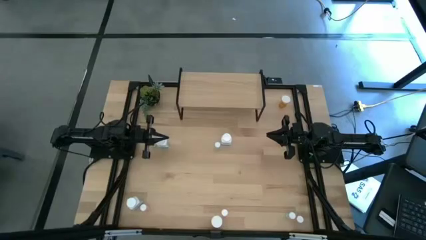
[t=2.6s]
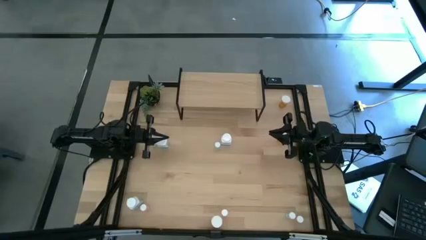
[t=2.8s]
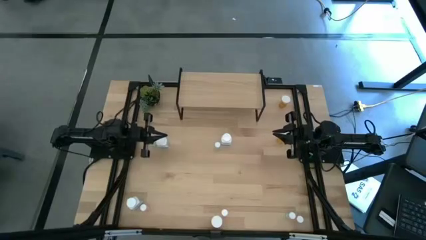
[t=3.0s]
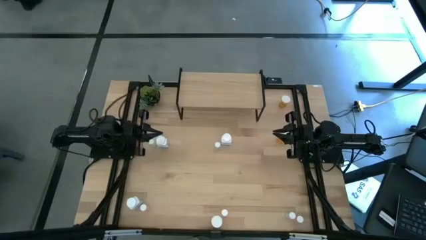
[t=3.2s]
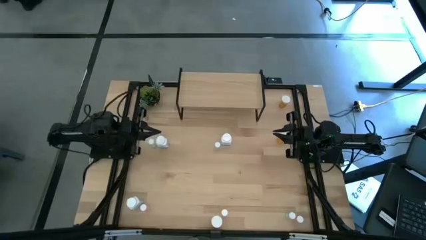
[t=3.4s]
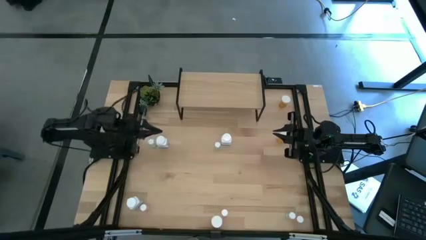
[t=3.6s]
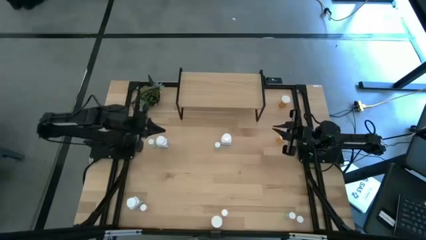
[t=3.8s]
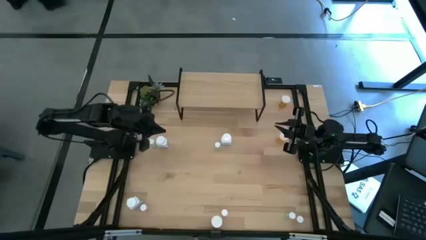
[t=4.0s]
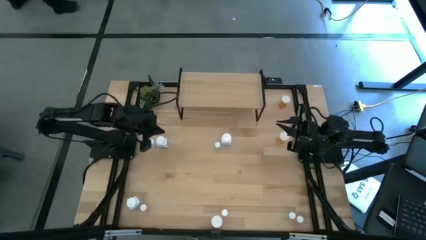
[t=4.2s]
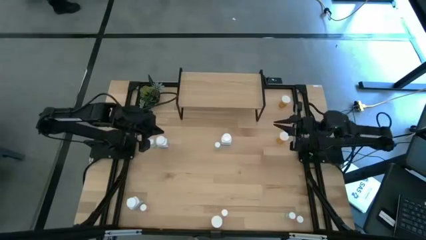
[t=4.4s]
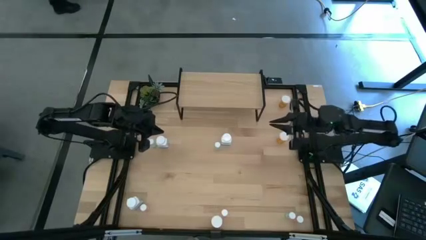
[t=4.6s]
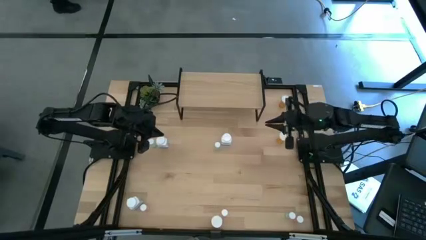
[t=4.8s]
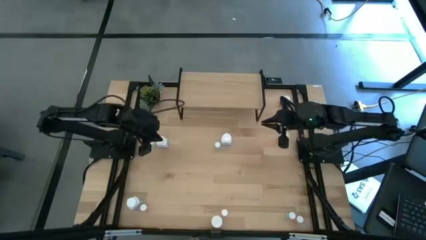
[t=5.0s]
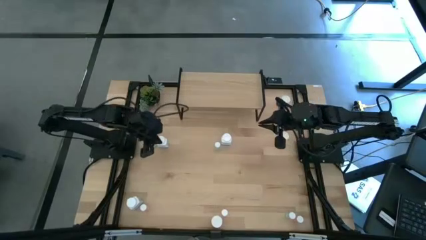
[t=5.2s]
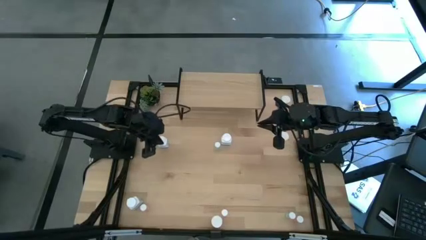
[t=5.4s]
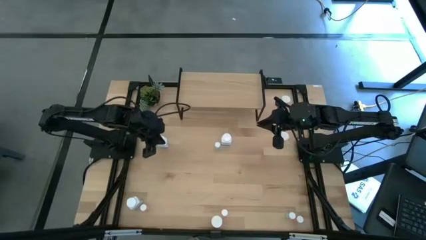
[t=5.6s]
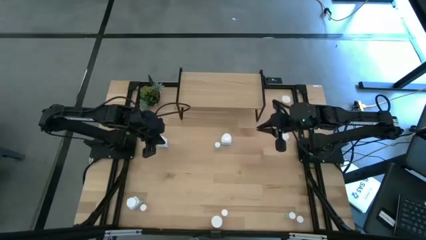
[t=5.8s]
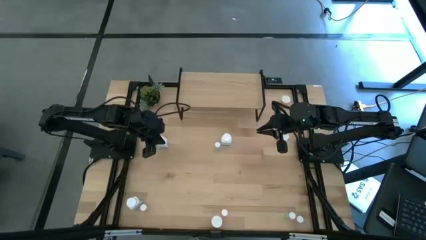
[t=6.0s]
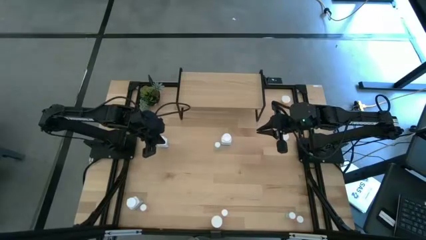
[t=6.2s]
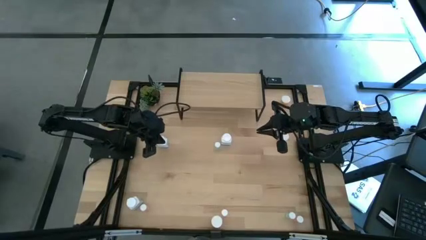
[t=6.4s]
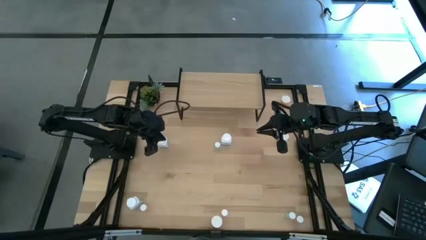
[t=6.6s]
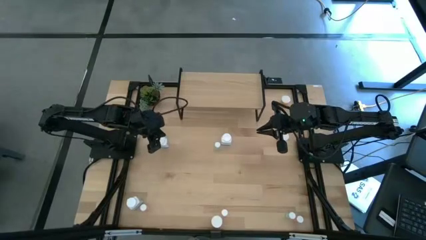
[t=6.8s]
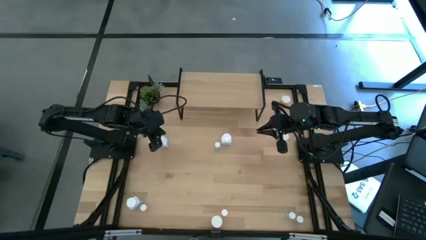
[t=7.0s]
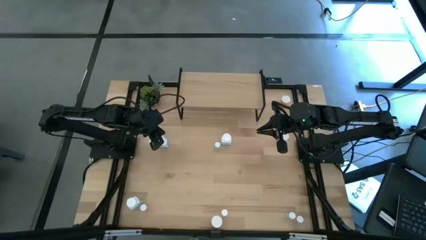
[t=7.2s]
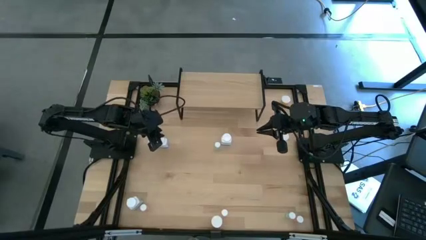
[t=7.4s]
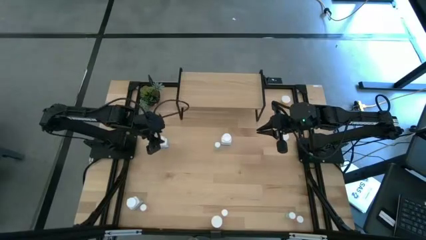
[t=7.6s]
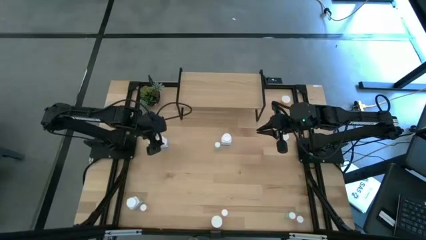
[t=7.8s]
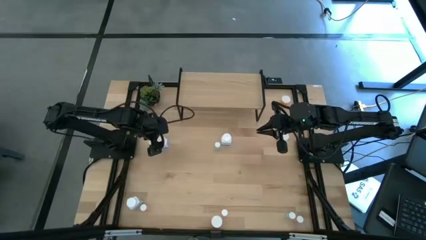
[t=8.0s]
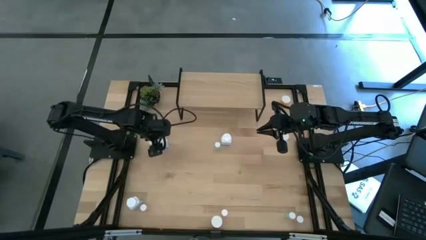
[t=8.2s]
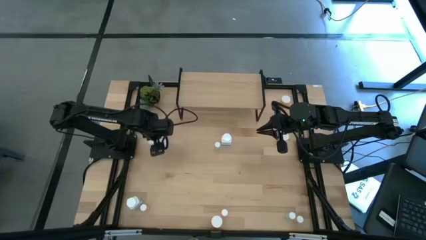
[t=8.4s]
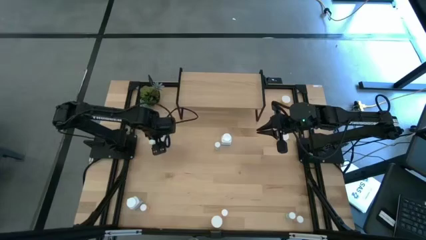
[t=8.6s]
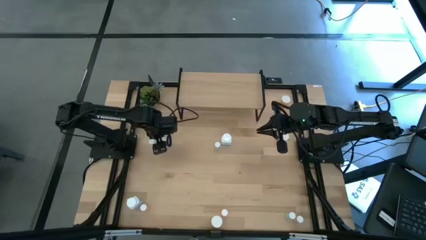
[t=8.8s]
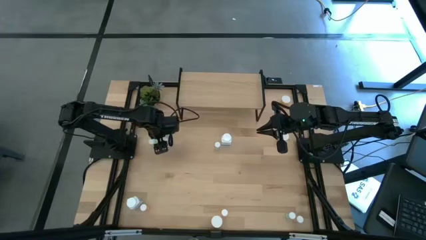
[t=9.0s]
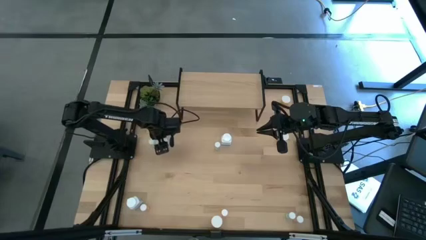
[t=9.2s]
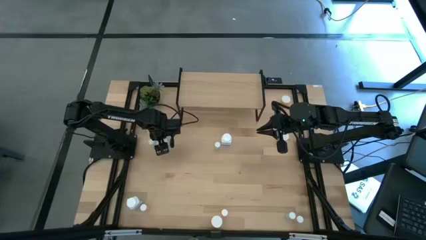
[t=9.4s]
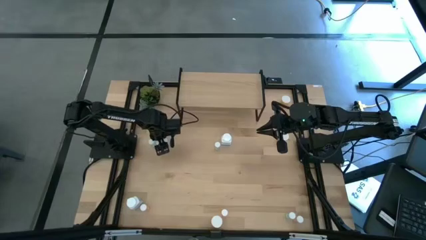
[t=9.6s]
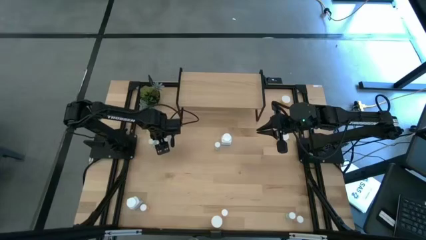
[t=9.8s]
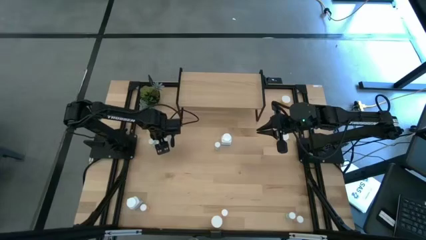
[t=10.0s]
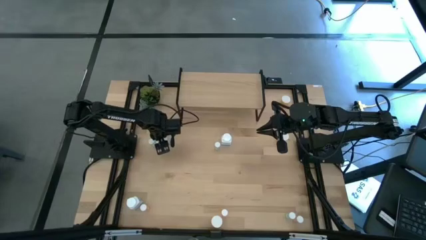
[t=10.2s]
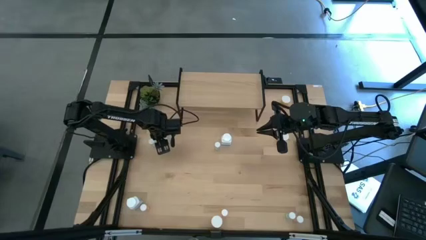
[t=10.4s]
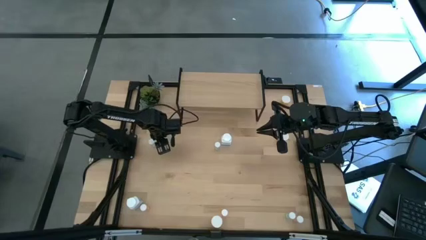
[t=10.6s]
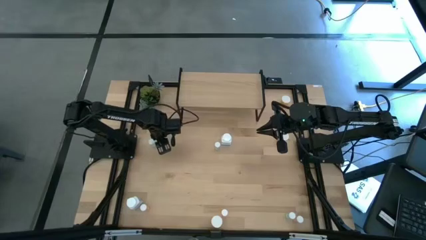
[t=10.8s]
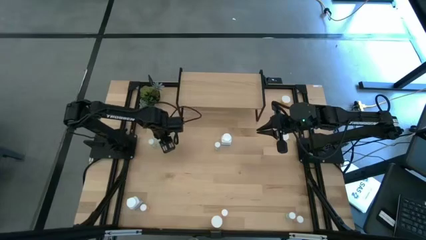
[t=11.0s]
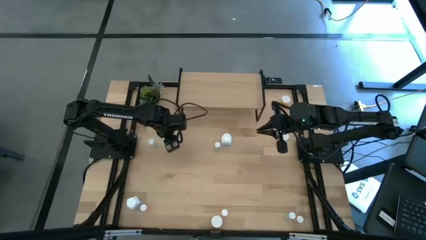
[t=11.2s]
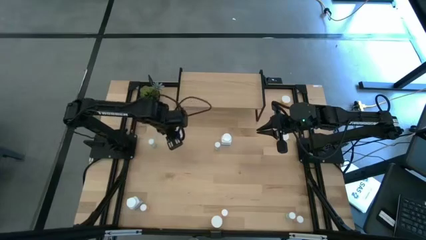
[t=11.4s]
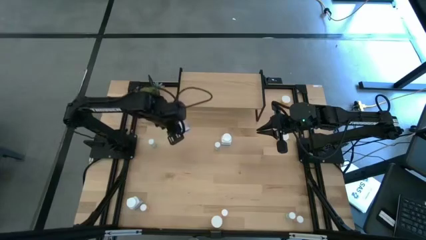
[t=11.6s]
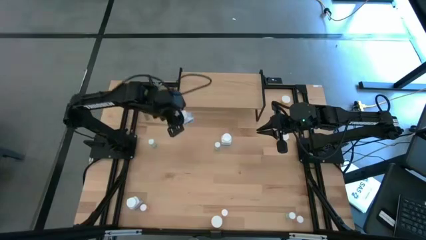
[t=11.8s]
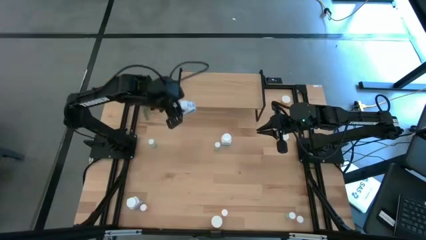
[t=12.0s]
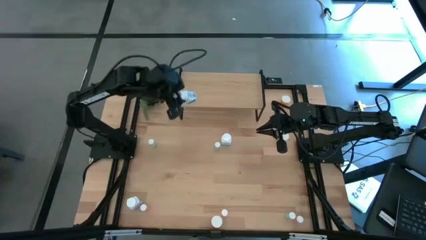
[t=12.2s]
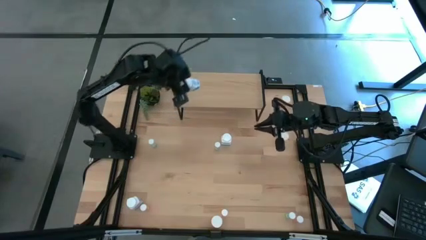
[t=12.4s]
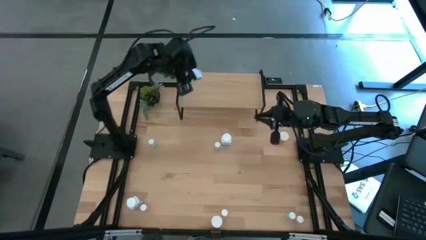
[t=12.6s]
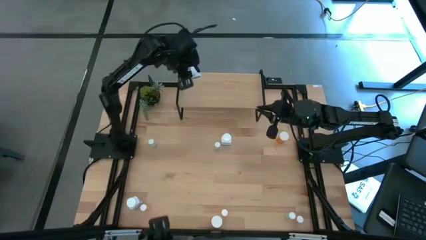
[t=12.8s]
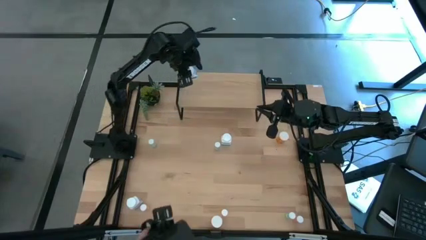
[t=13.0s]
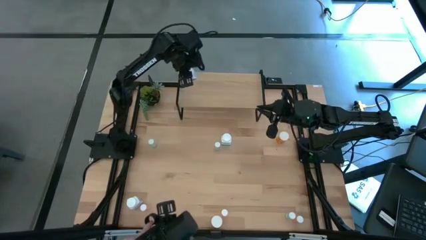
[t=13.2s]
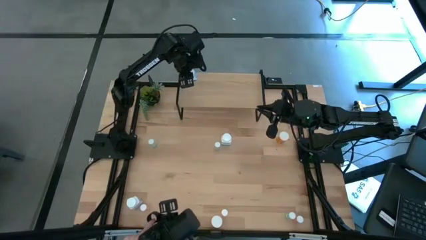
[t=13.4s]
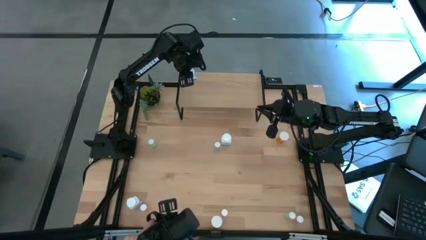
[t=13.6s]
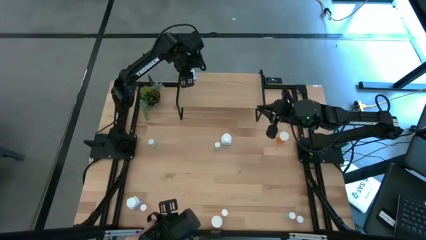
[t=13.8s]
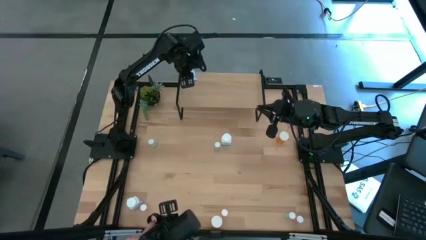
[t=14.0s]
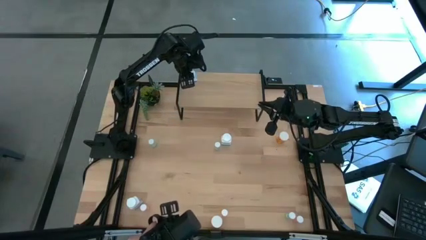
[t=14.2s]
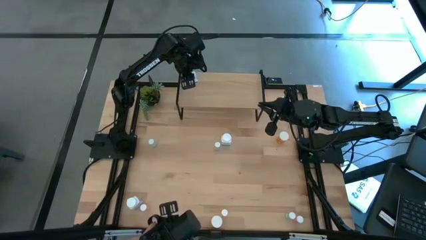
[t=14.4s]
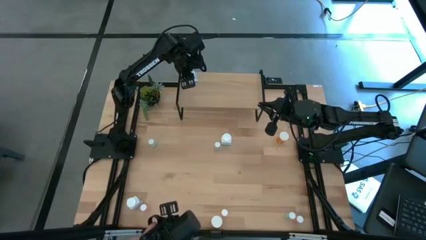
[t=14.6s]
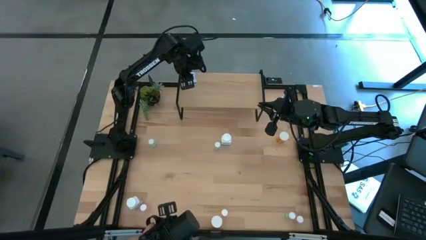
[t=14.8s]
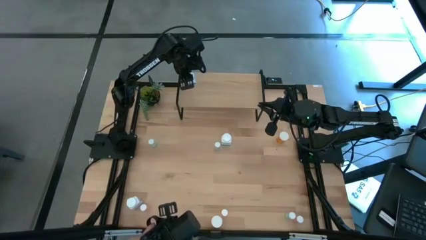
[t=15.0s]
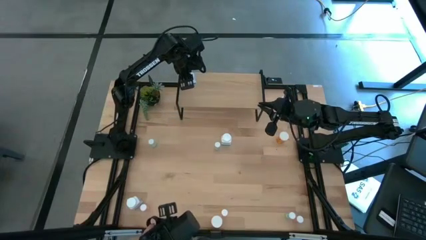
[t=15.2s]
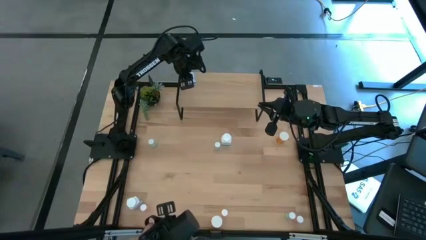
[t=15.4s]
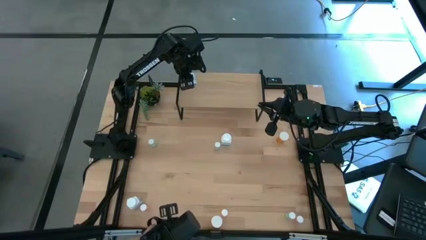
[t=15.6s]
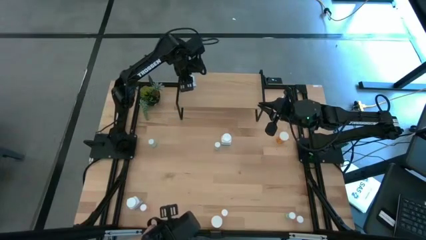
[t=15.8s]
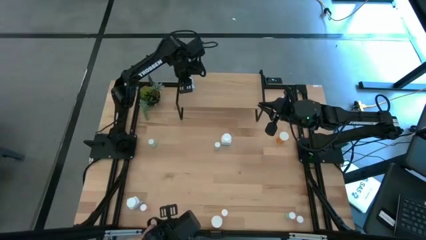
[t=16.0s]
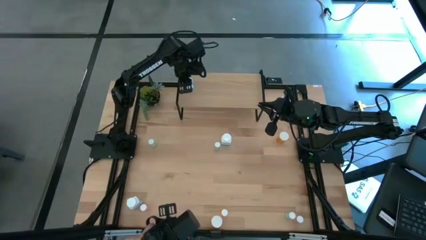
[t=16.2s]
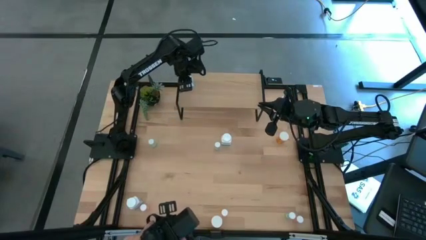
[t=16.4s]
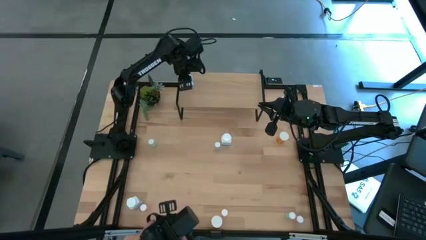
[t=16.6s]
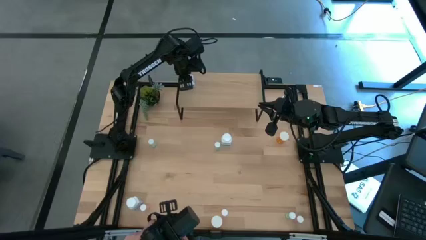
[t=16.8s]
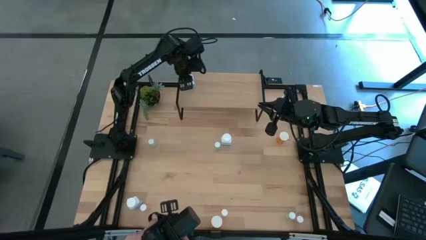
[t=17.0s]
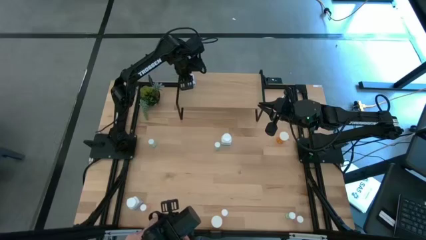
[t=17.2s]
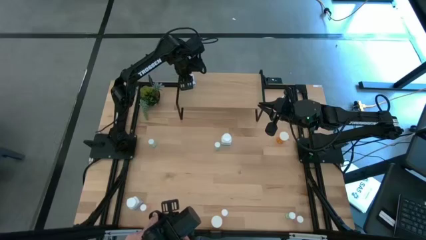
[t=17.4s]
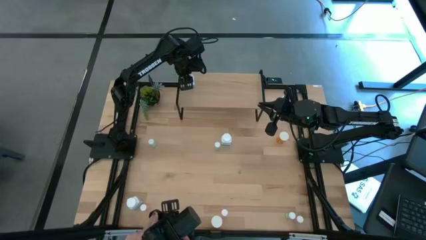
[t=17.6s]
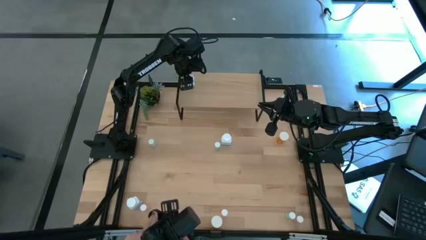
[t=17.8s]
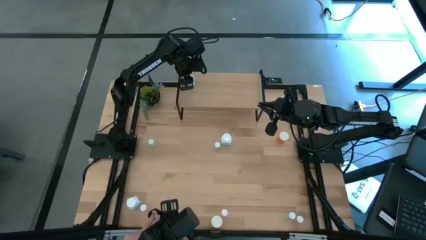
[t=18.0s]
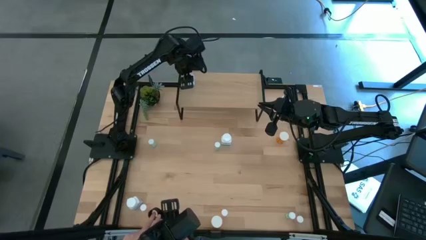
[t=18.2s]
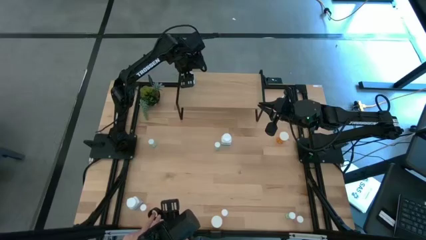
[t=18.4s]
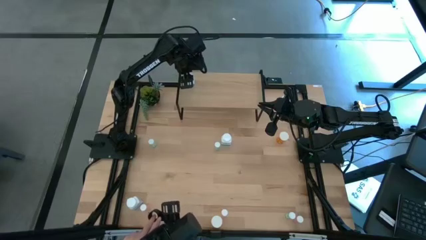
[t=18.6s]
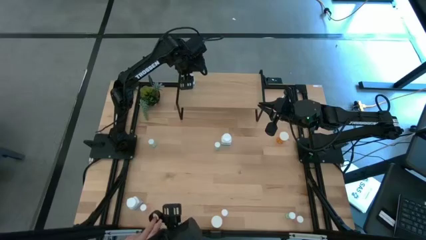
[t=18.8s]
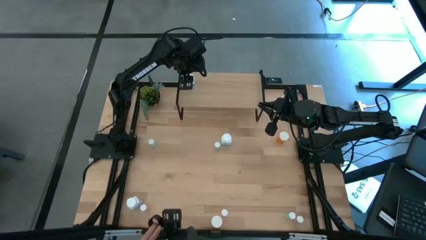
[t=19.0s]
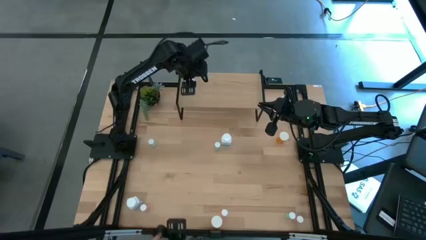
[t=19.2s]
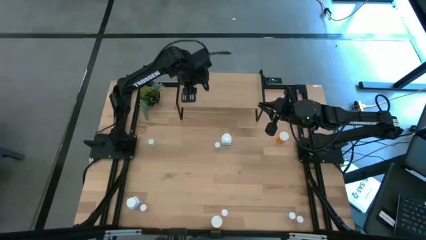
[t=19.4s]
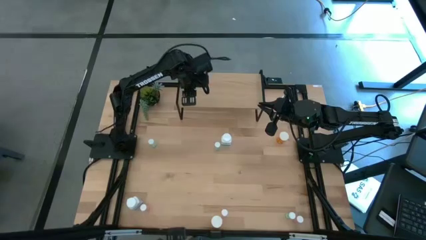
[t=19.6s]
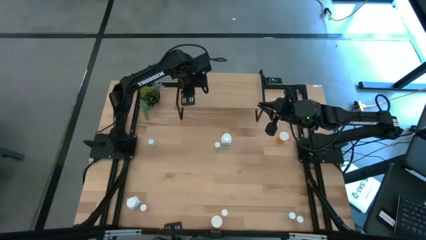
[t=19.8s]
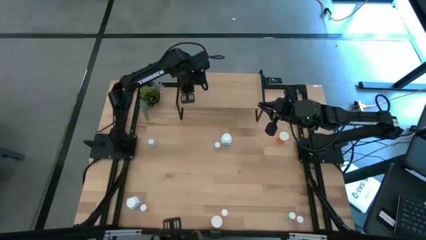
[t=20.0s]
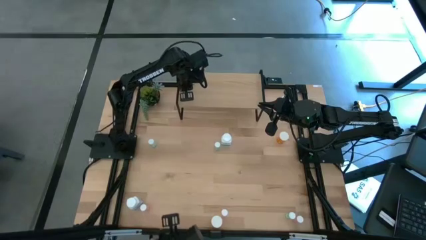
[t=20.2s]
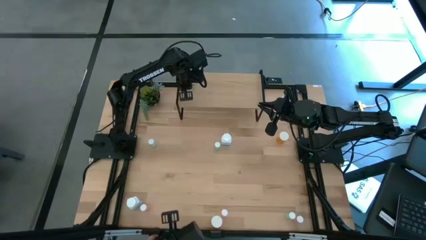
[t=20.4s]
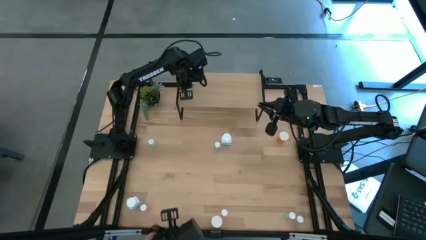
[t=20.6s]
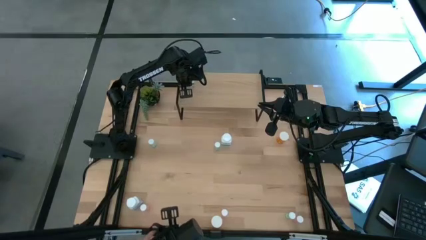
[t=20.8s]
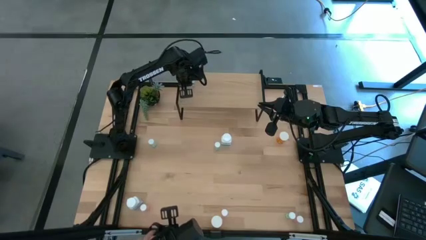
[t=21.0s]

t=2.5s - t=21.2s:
Task: Pick and place medicine bottles onto shelf by color
Put the top left white pill bottle on the shelf
